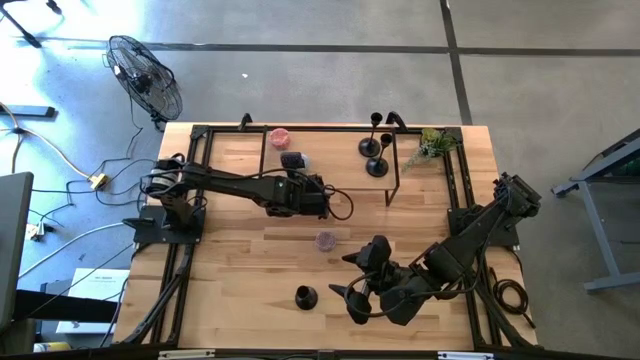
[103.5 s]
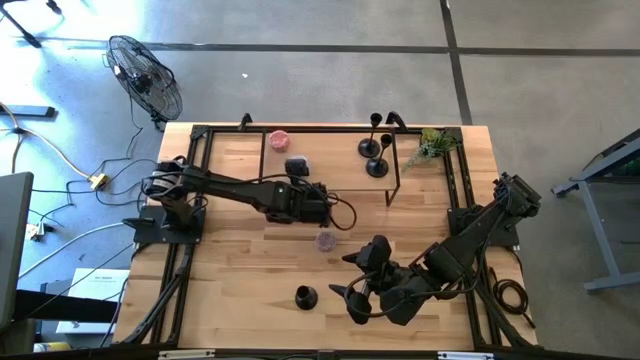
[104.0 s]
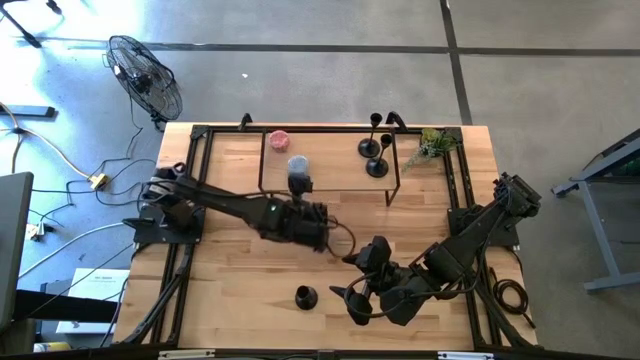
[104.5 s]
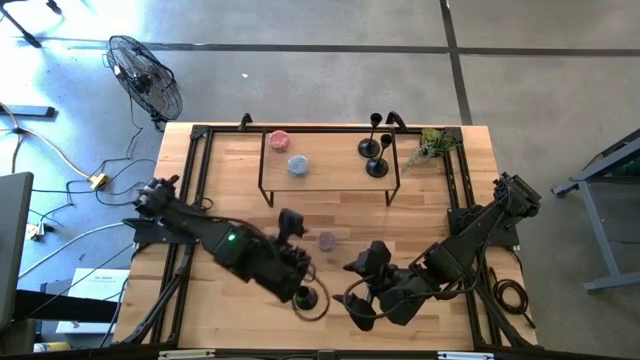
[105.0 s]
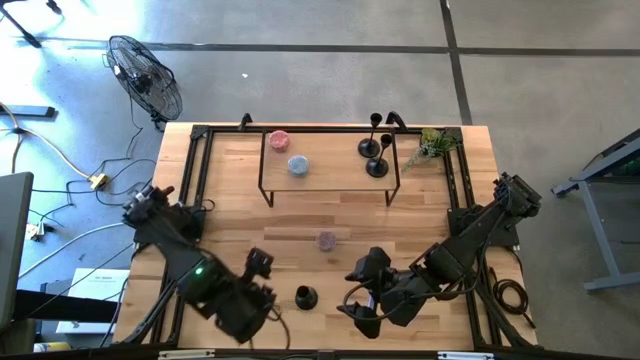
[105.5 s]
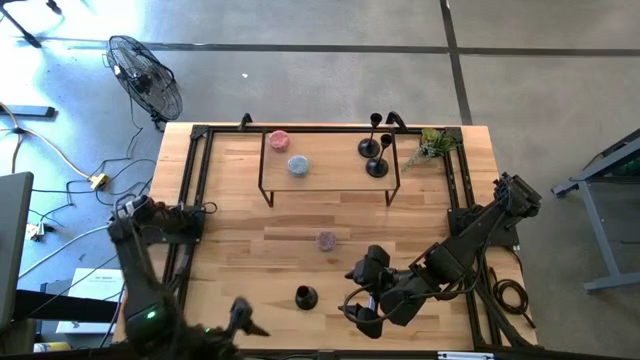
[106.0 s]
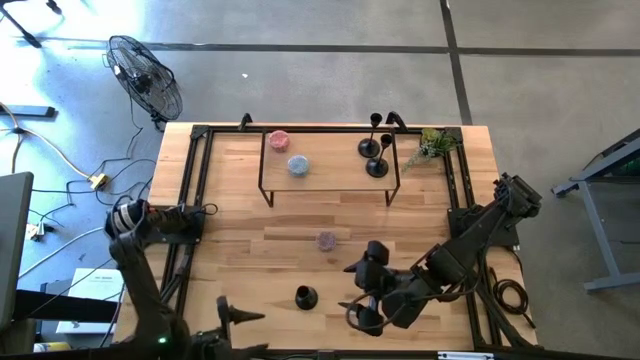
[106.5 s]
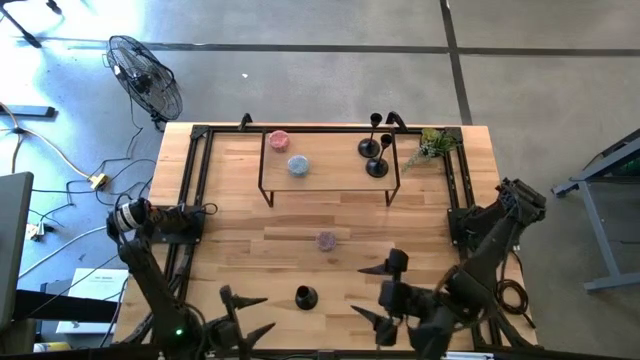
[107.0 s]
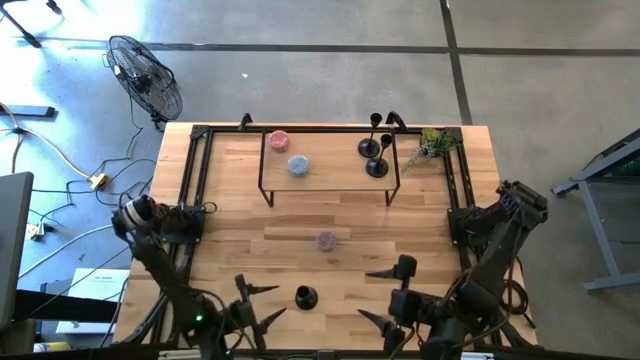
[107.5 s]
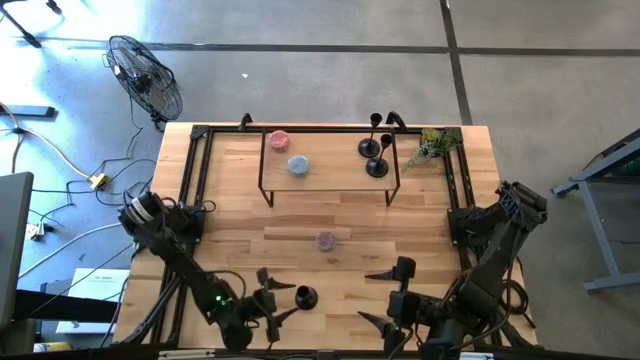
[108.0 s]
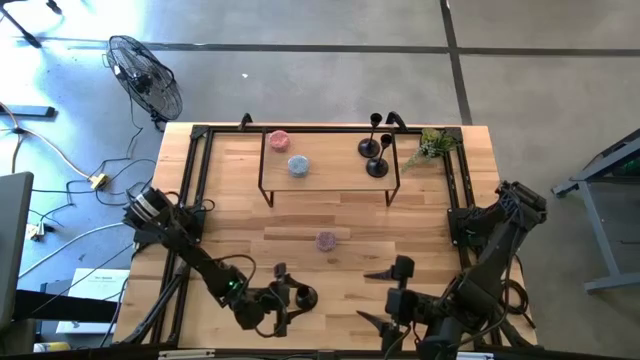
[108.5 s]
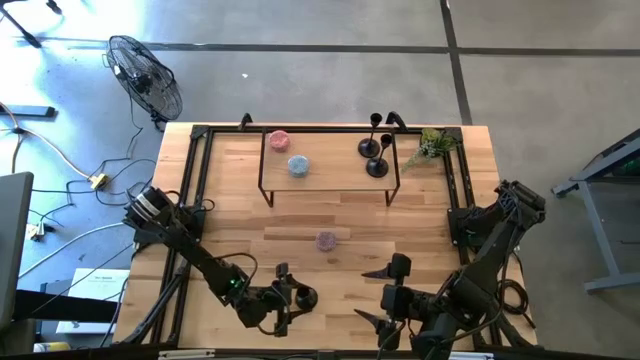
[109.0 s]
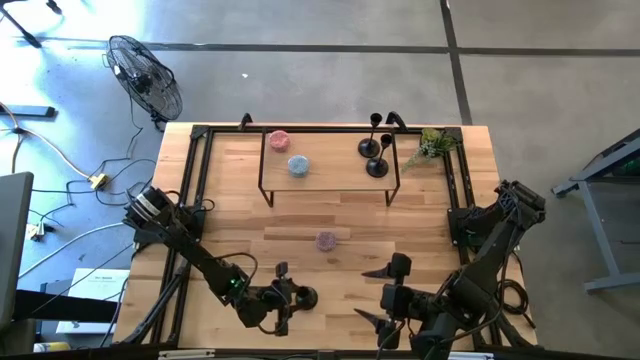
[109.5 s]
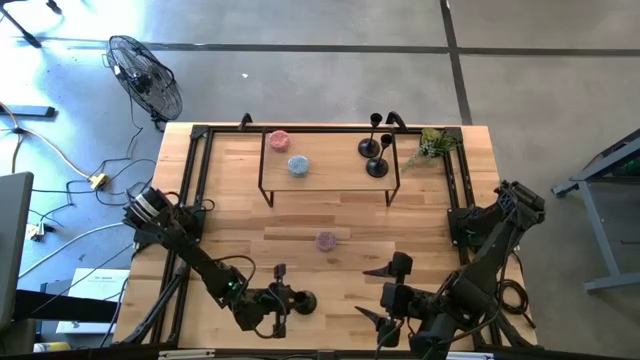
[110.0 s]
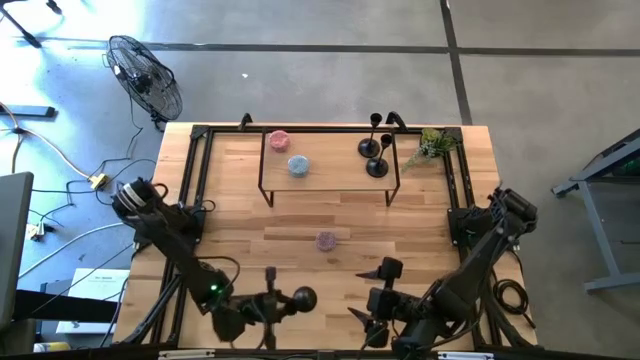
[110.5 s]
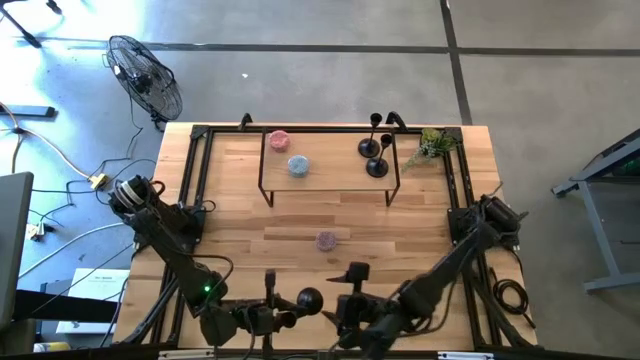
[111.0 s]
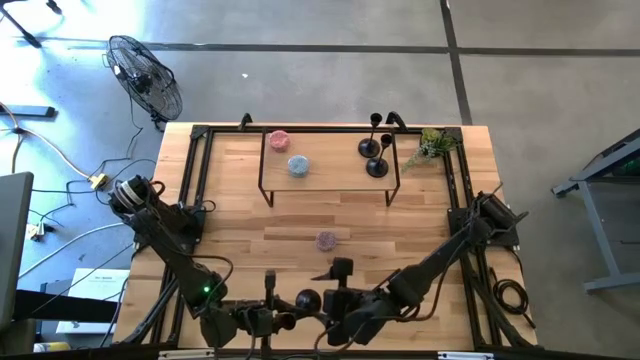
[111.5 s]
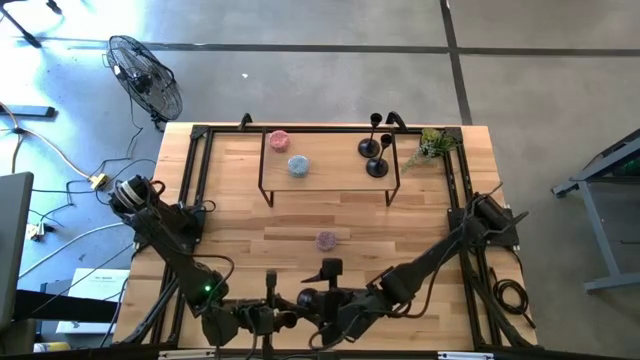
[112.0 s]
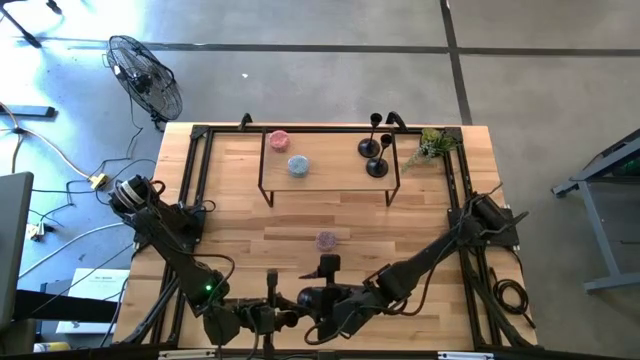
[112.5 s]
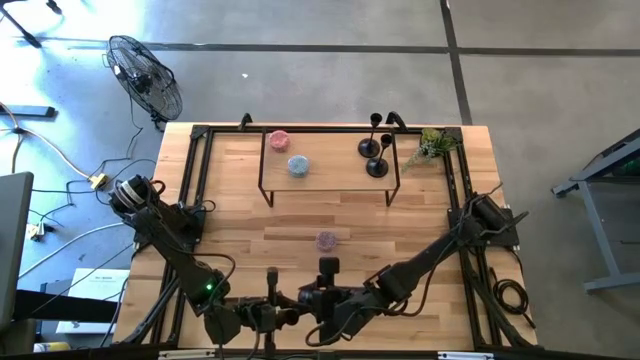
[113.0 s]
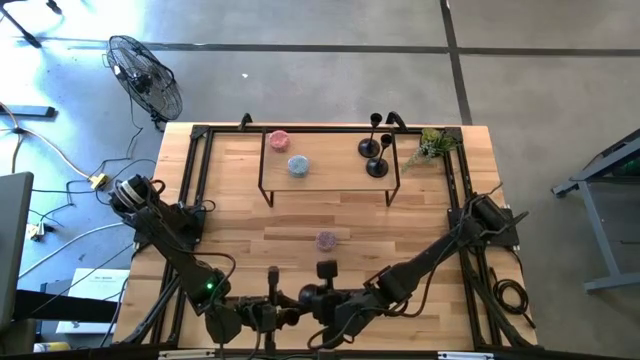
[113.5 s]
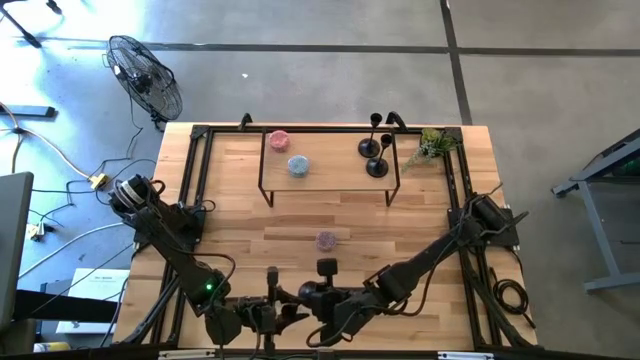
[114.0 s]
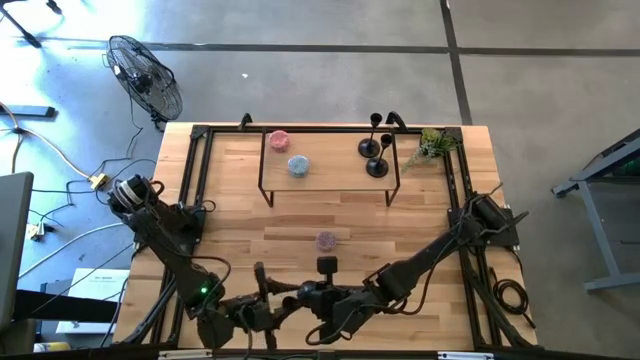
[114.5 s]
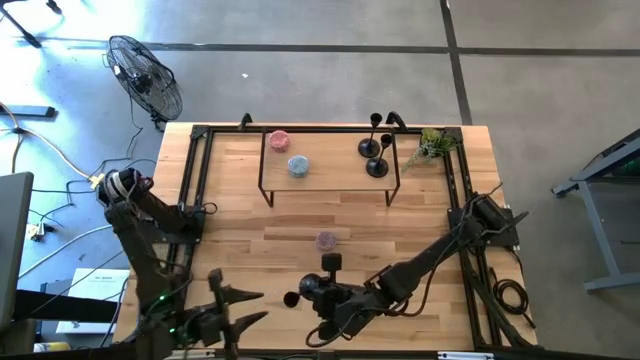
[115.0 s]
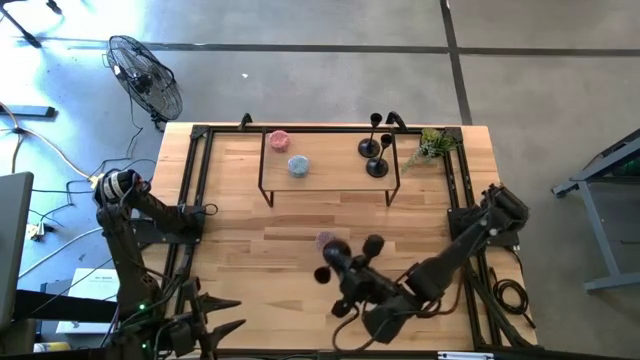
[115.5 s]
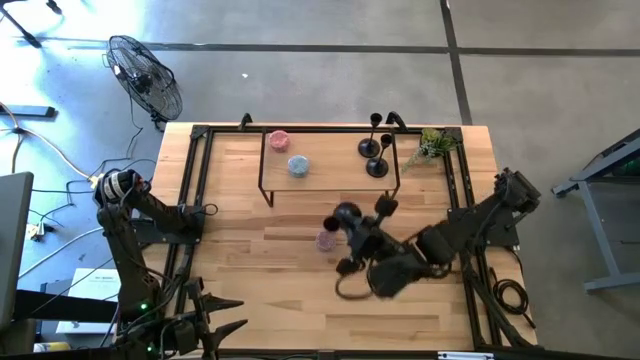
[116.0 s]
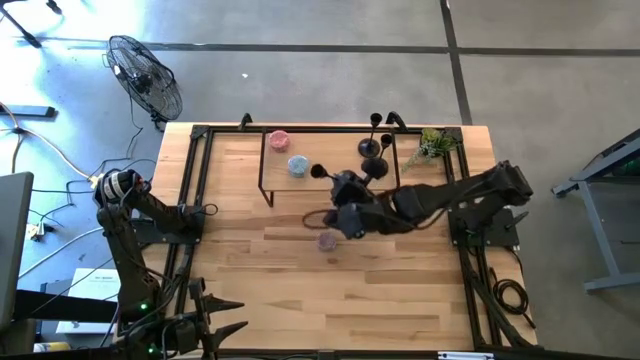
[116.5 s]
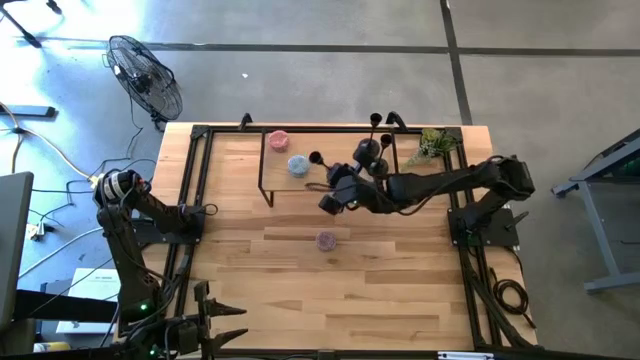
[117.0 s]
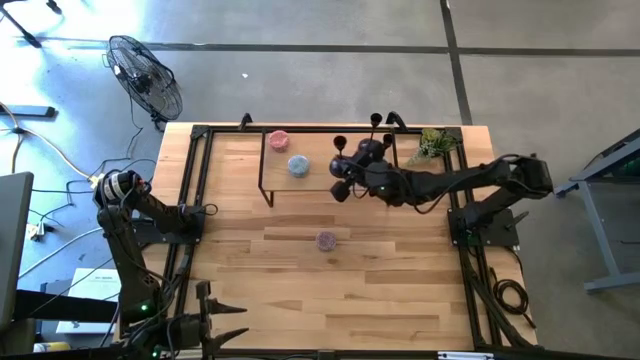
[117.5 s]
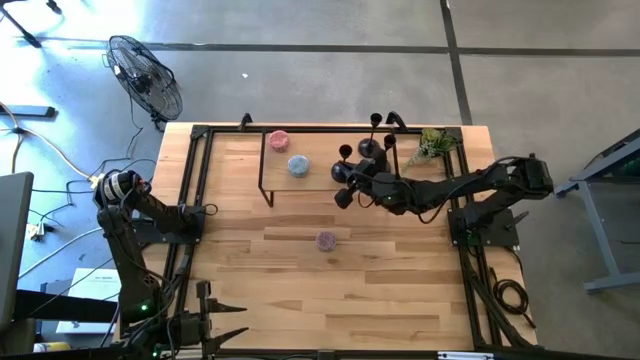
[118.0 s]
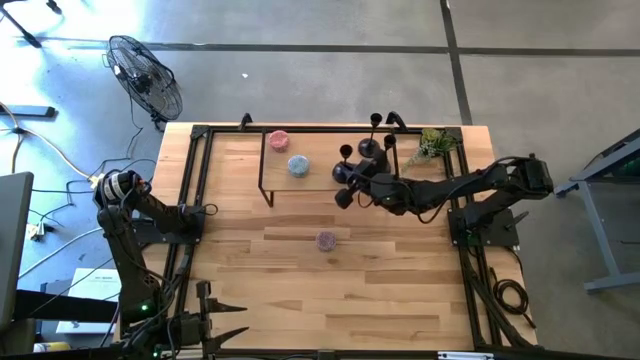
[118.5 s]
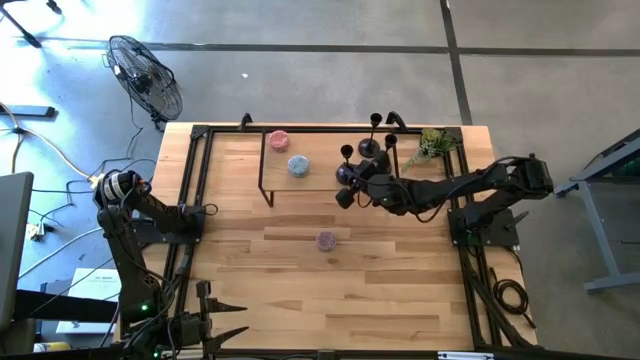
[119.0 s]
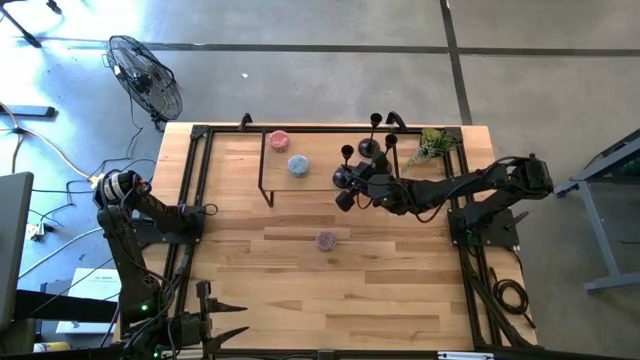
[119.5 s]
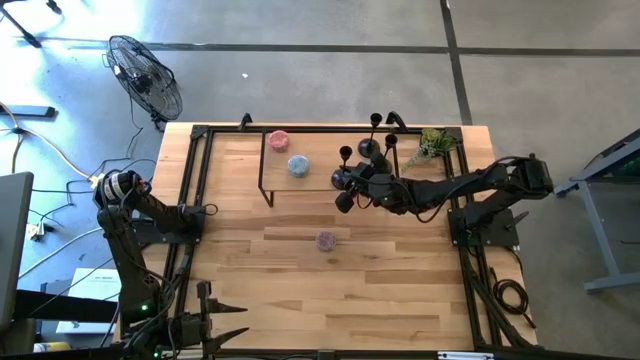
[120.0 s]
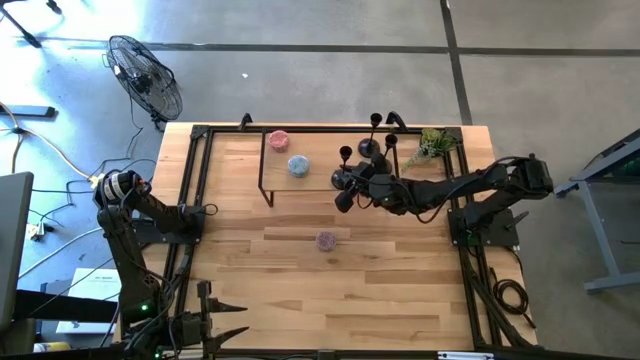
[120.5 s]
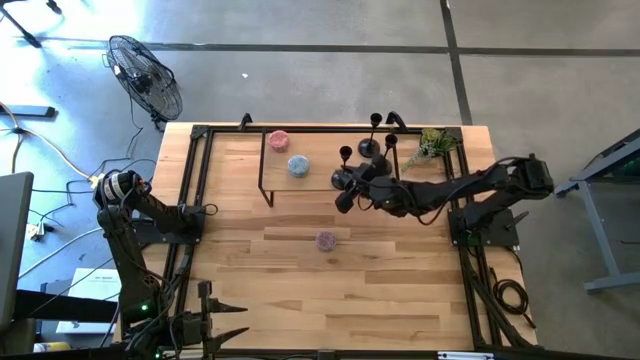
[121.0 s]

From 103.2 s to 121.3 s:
Task: Pick & Place candle stick holders
Put the black candle holder on the shelf
